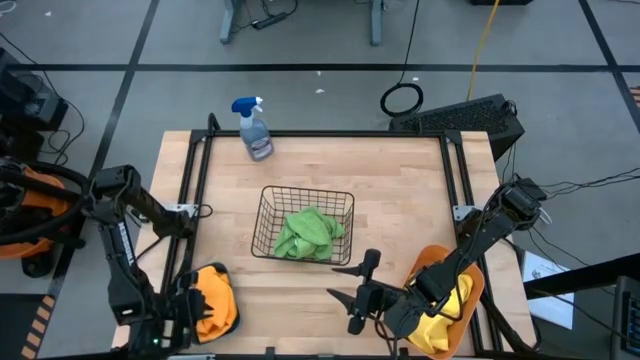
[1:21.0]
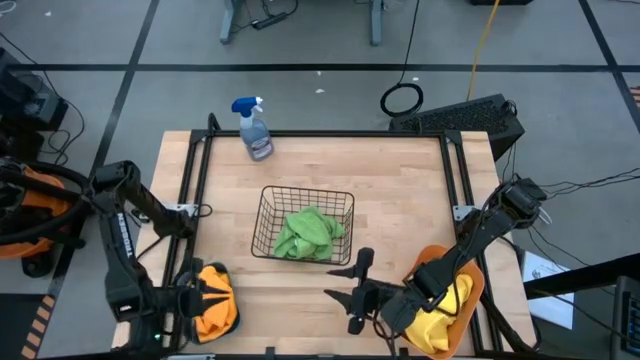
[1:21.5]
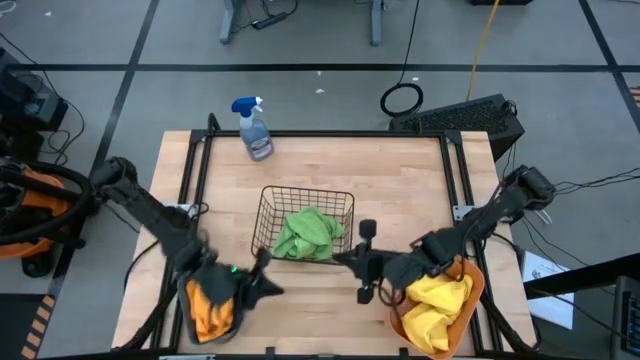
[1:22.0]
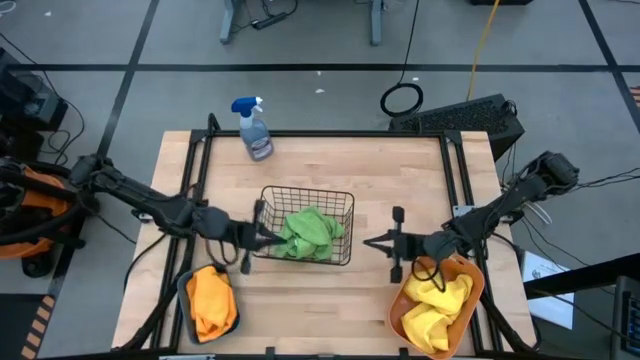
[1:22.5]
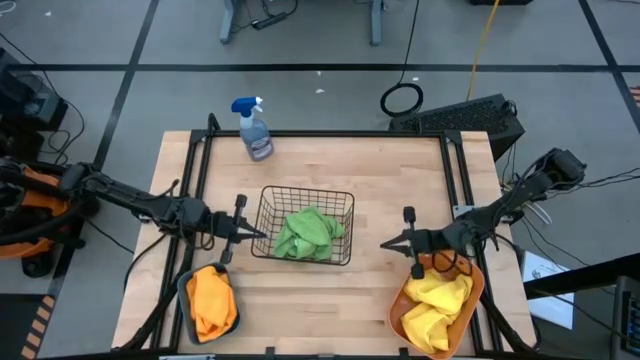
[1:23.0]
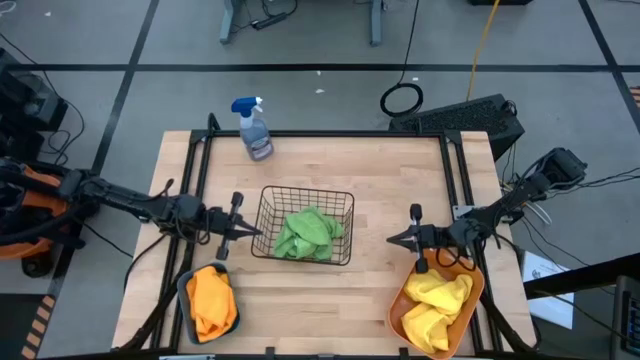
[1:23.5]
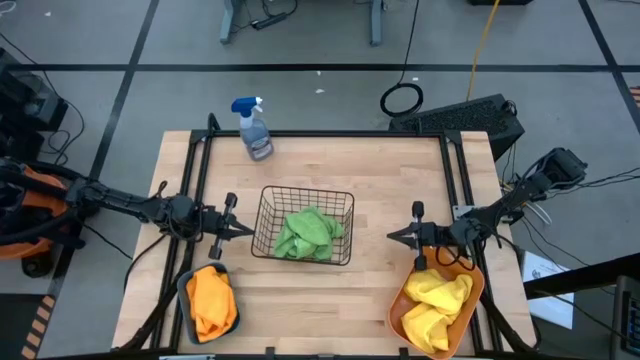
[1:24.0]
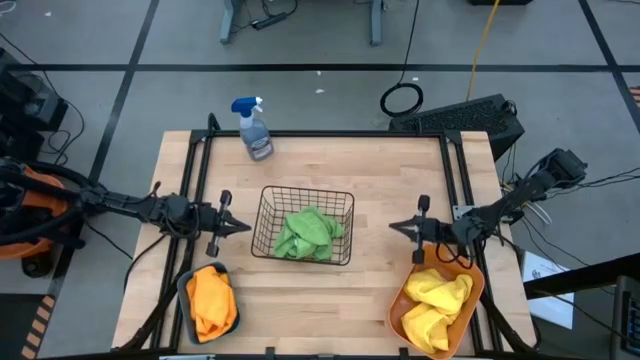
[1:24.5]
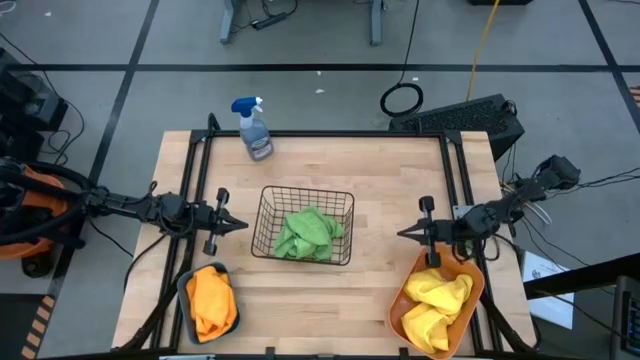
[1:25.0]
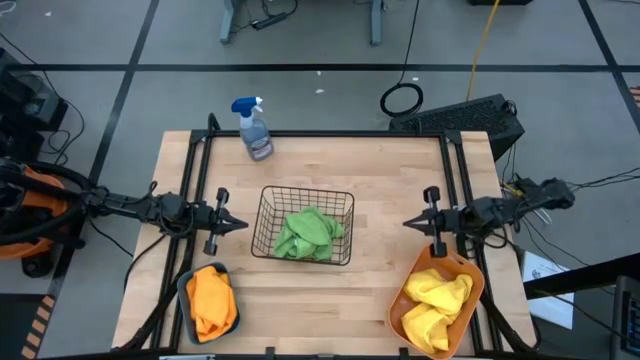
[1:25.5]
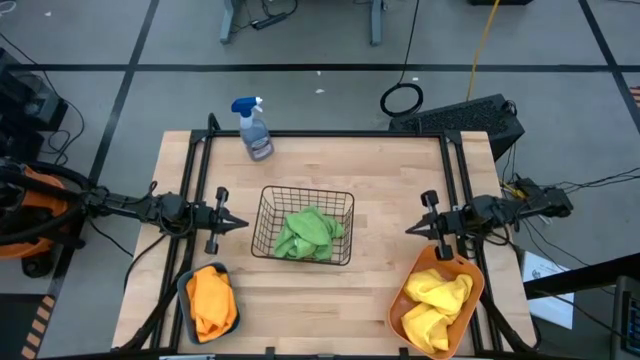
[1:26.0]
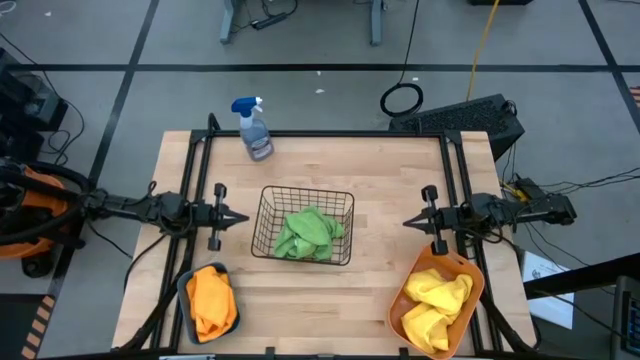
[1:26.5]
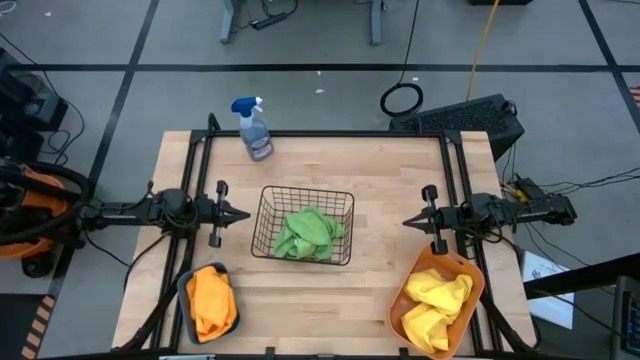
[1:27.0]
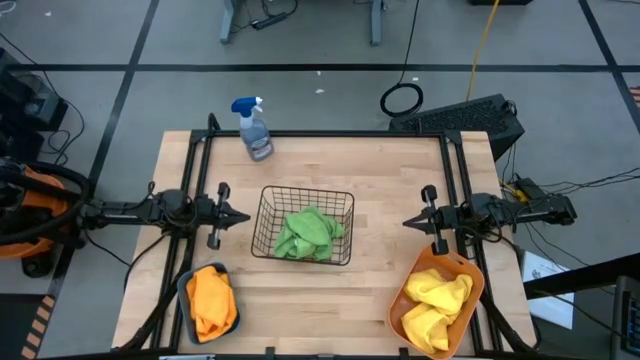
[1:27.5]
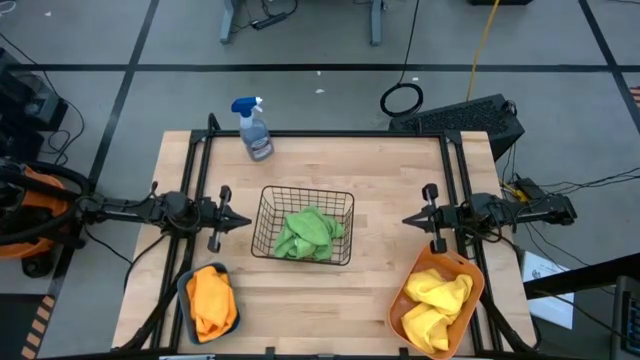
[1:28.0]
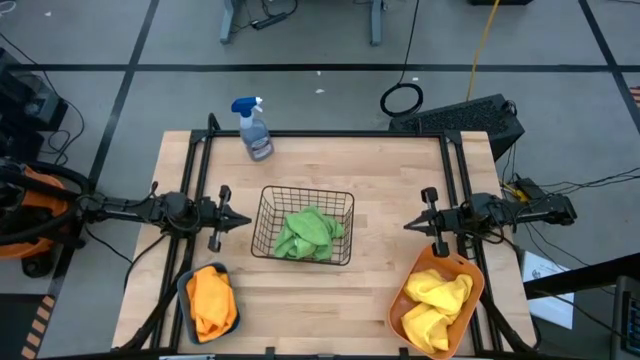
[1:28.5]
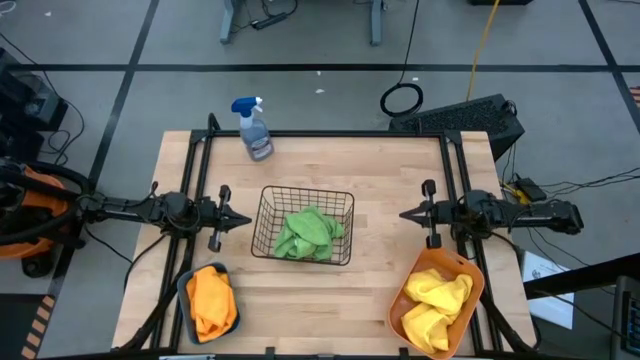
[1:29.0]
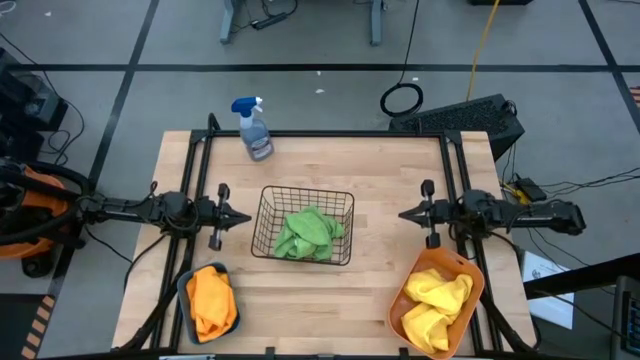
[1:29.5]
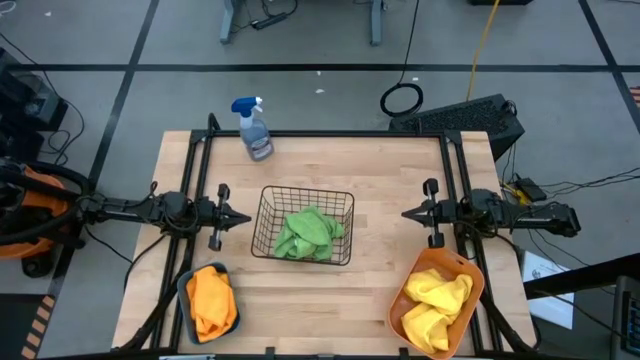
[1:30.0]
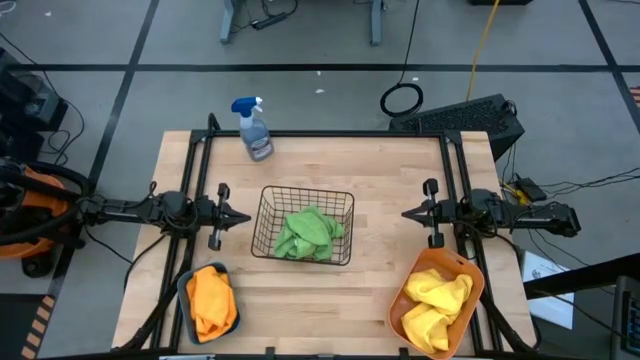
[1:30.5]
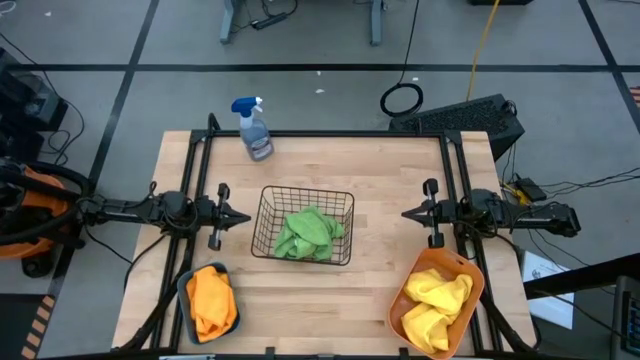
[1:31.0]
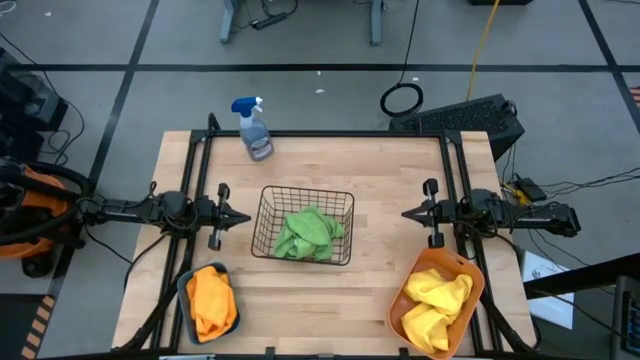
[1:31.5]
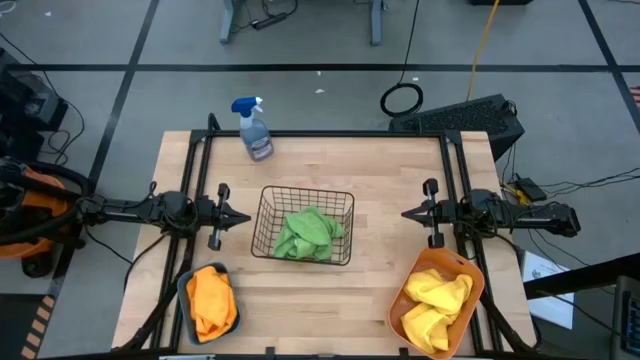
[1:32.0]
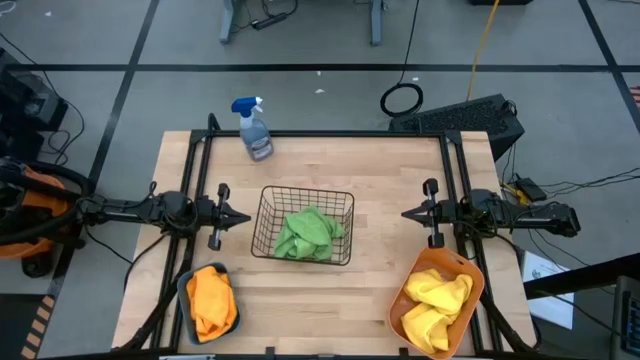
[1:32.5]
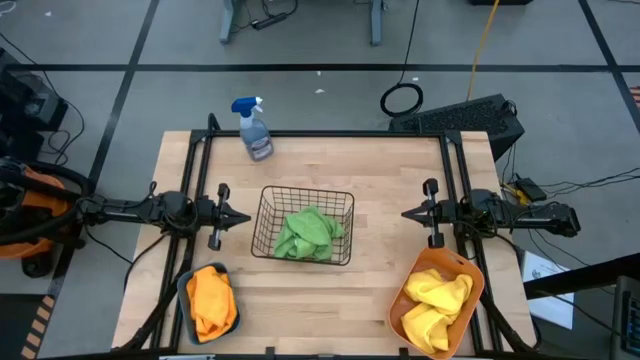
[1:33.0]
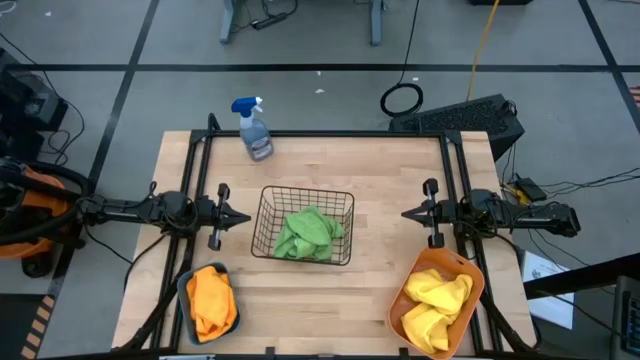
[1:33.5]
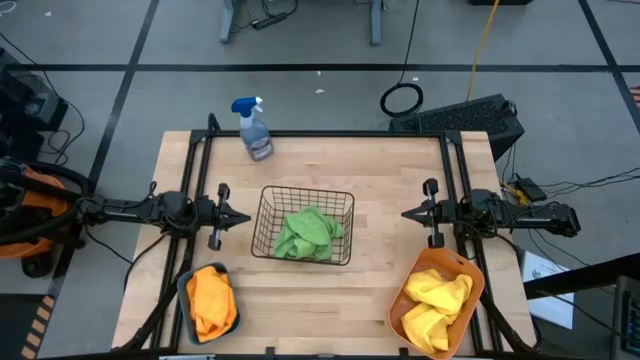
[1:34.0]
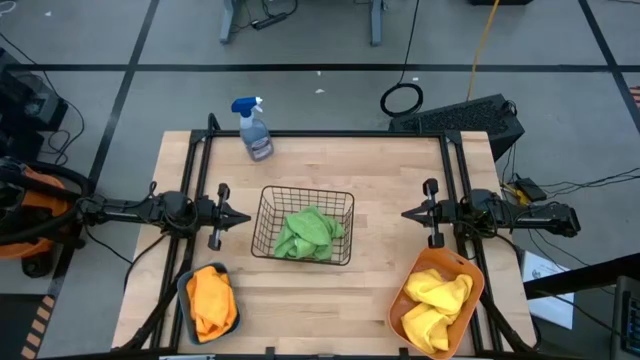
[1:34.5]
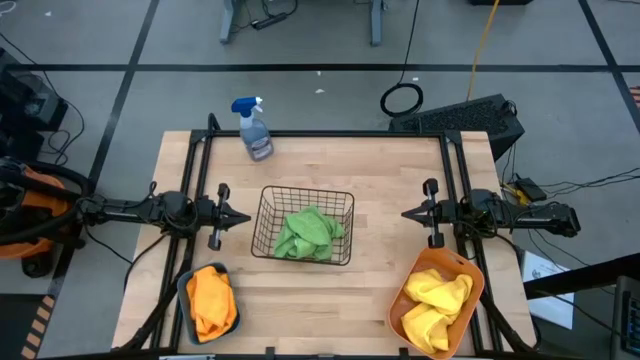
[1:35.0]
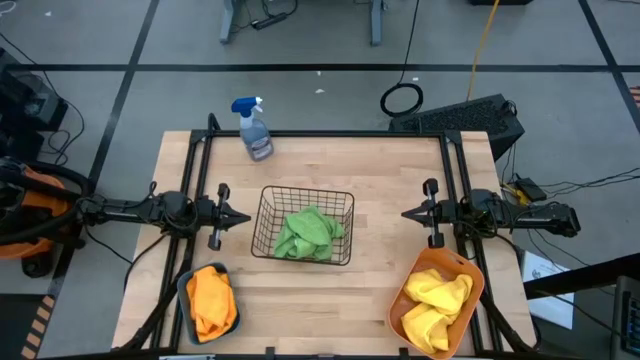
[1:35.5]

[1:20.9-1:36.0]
Task: Sort microfiber towel by color & place in baskets
Return to Home Position

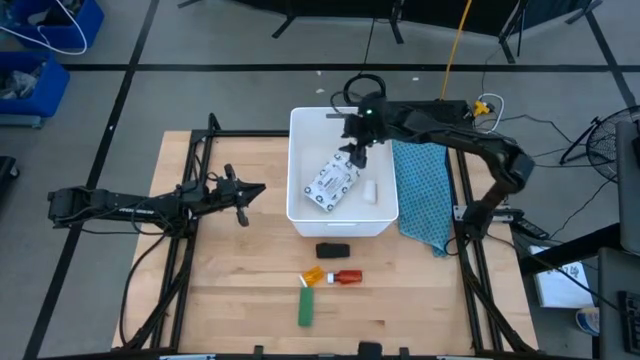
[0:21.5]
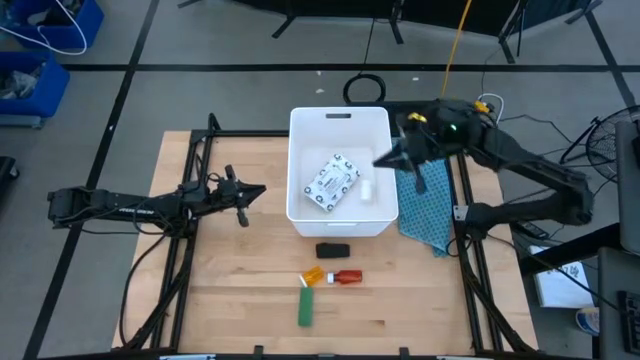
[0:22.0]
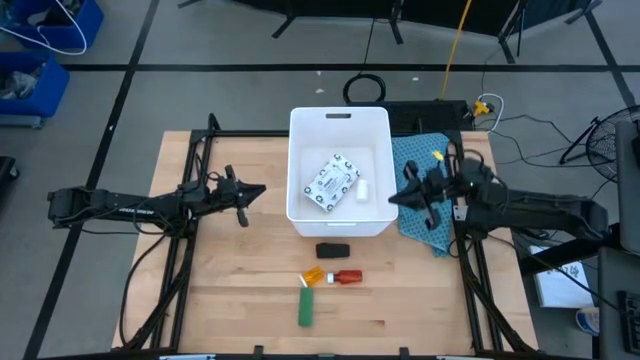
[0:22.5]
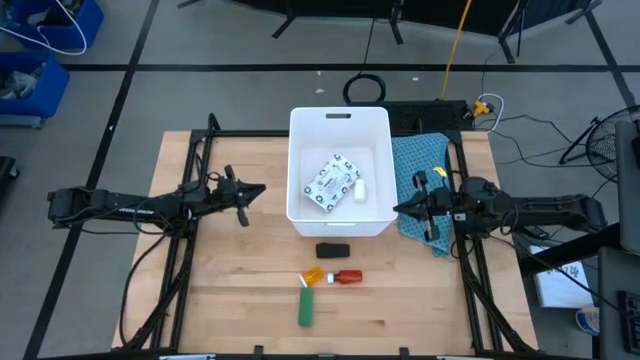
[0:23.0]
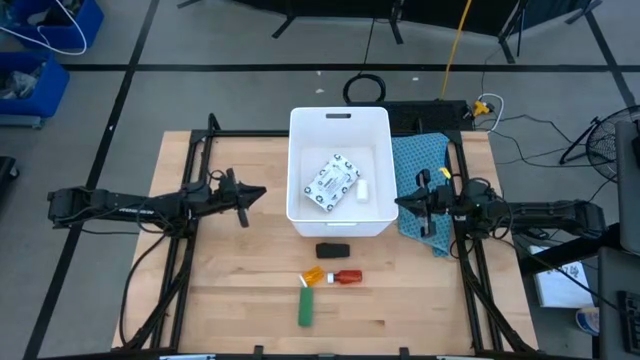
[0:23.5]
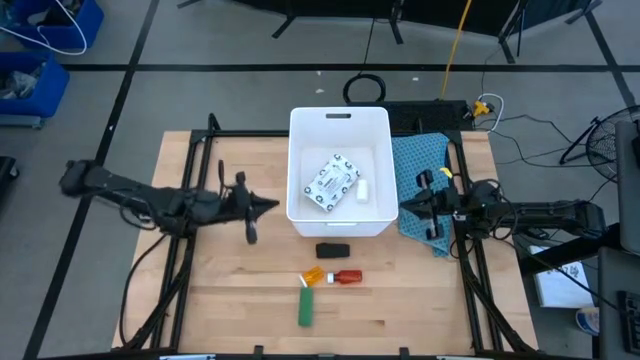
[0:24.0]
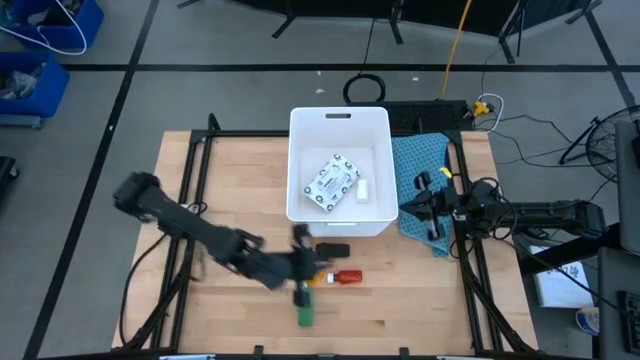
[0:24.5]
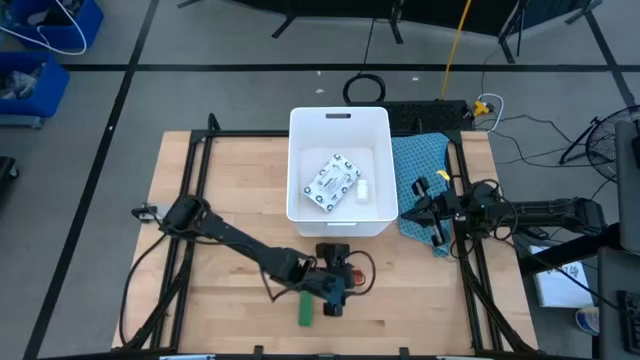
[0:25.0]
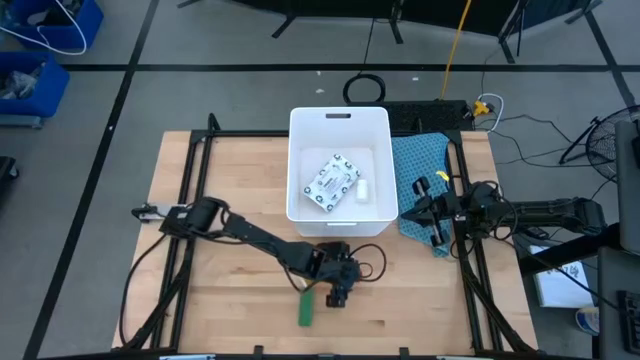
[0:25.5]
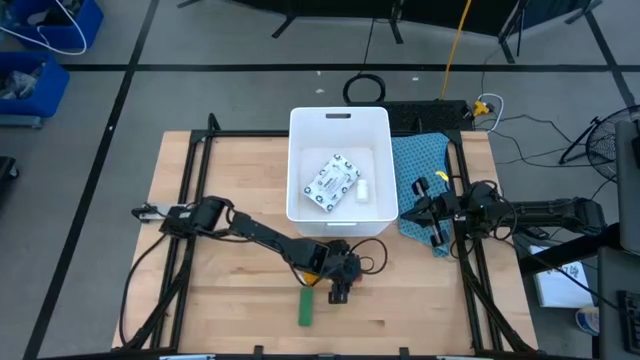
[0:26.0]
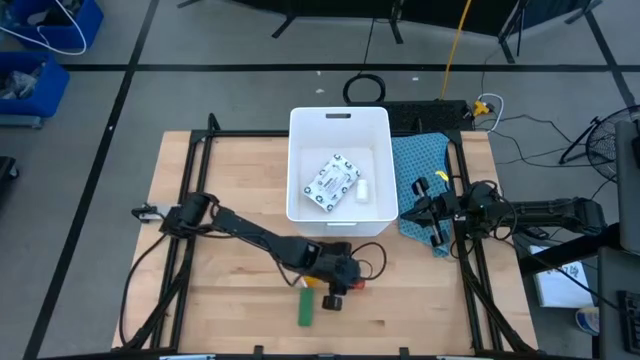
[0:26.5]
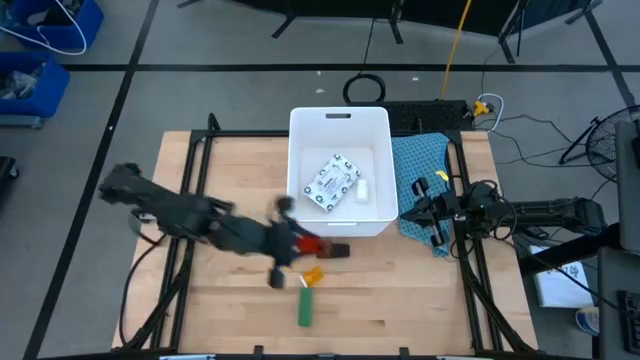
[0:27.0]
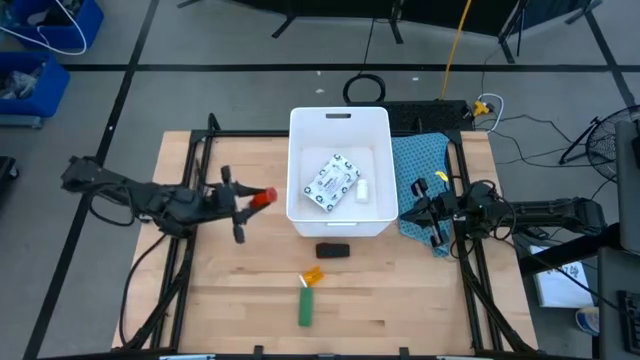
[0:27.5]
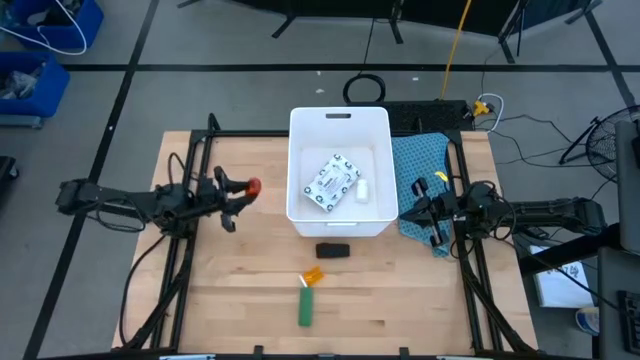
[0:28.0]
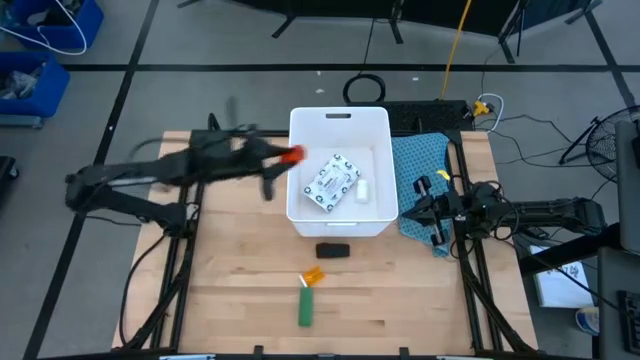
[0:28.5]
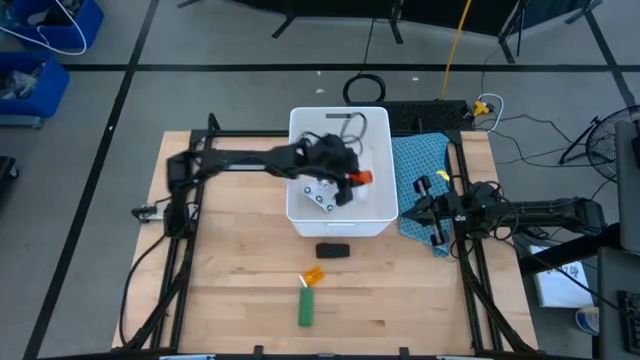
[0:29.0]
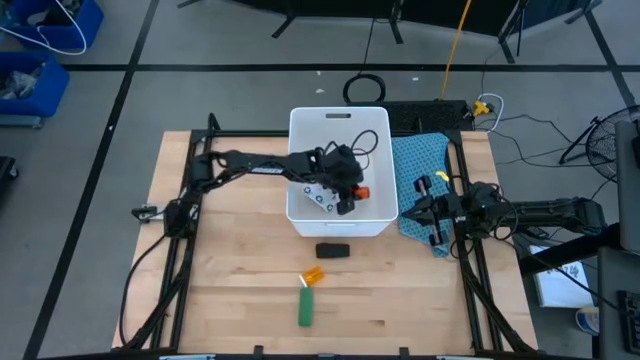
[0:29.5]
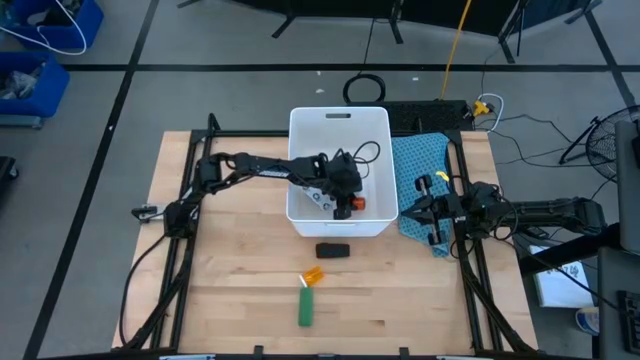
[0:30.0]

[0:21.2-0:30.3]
Task: Pick & place medical supplies in basket/bin
Put the brown medicine bottle into the white bin
